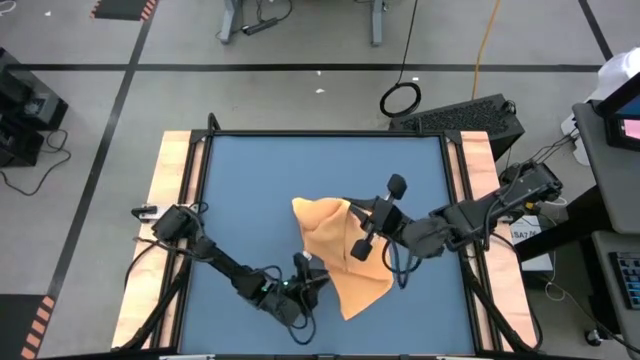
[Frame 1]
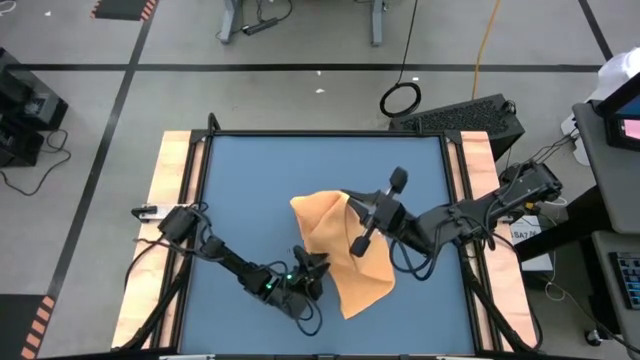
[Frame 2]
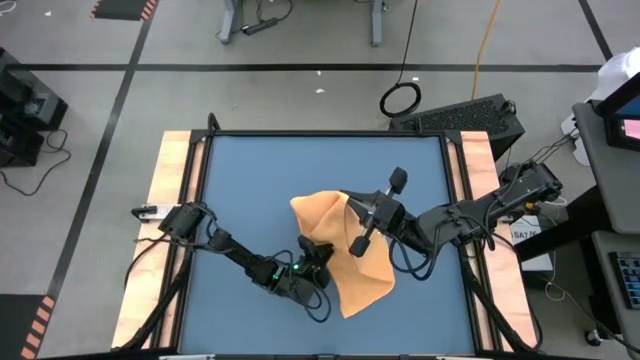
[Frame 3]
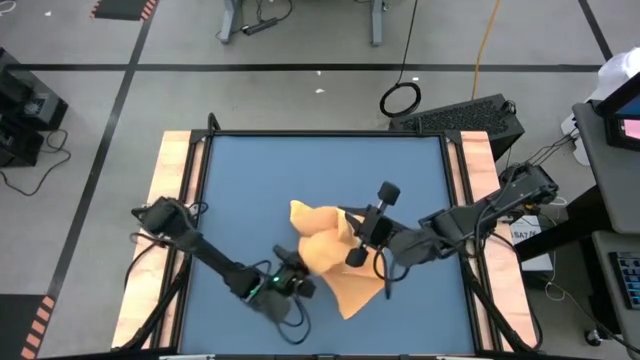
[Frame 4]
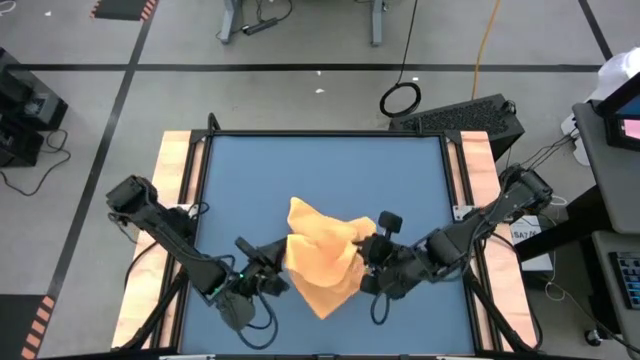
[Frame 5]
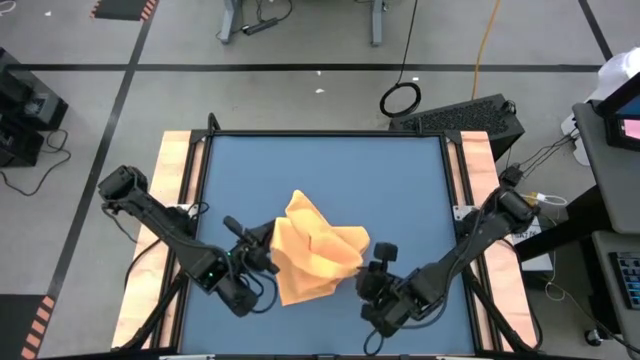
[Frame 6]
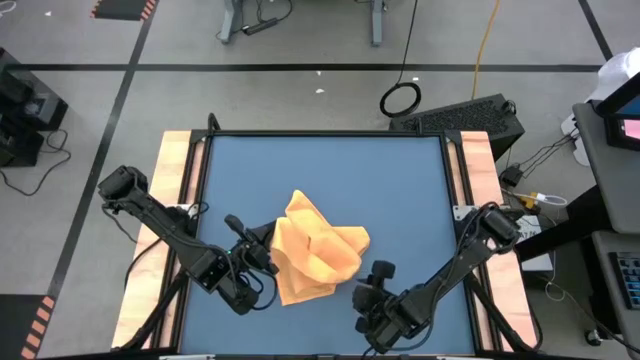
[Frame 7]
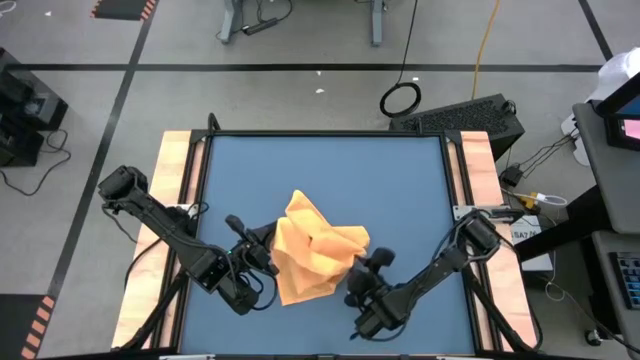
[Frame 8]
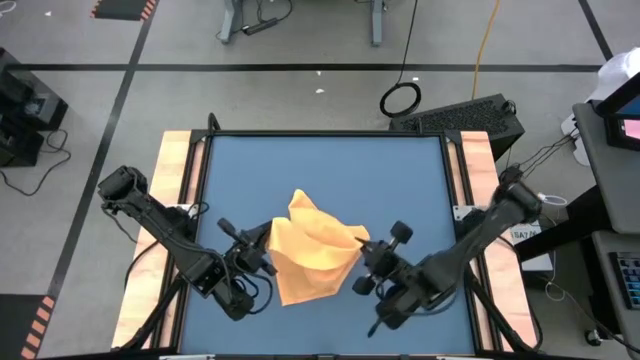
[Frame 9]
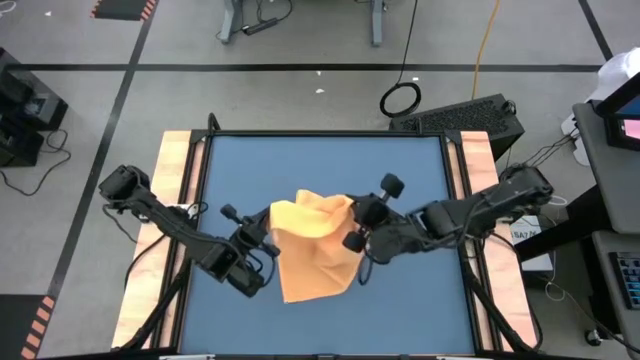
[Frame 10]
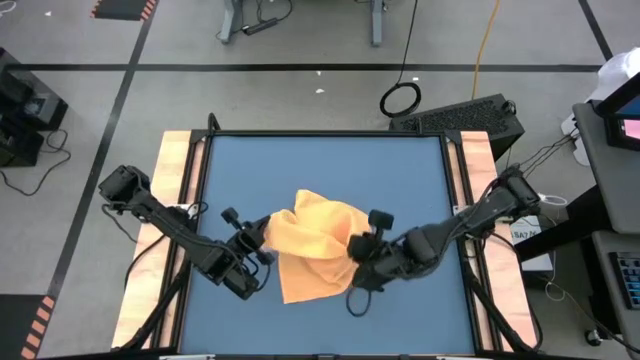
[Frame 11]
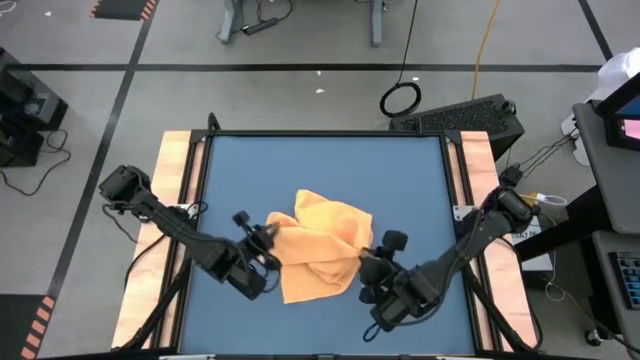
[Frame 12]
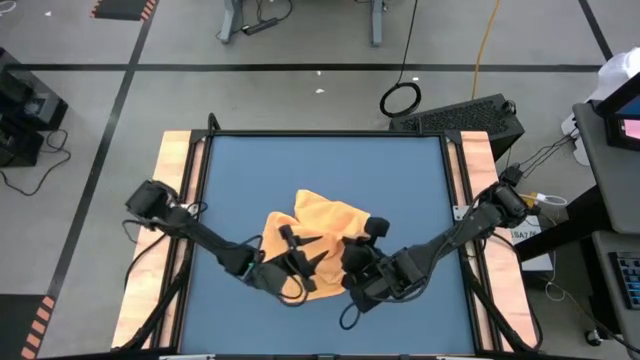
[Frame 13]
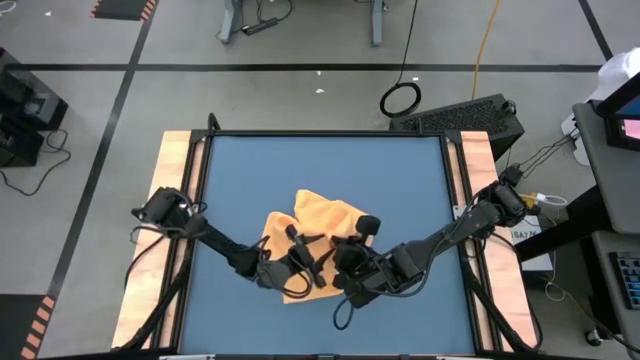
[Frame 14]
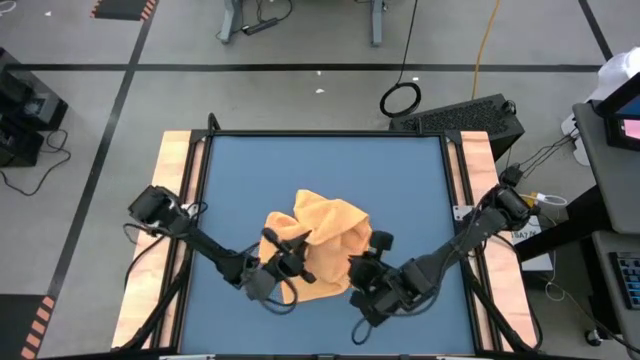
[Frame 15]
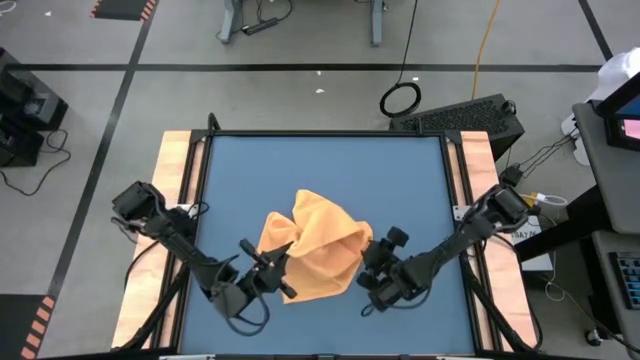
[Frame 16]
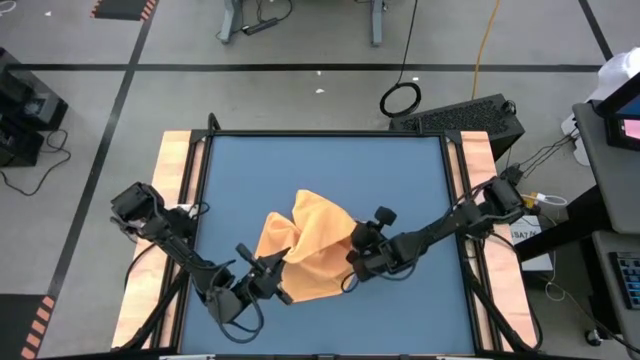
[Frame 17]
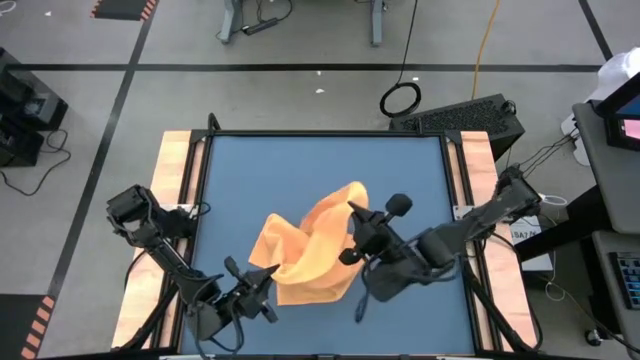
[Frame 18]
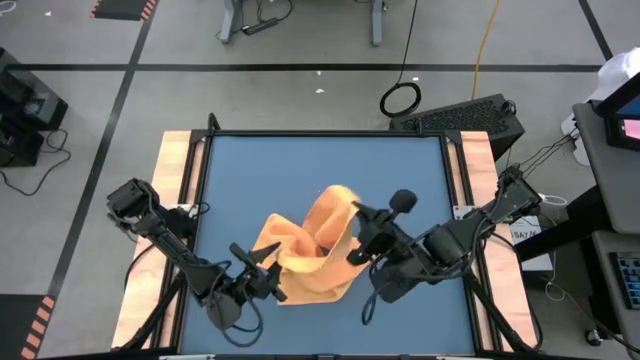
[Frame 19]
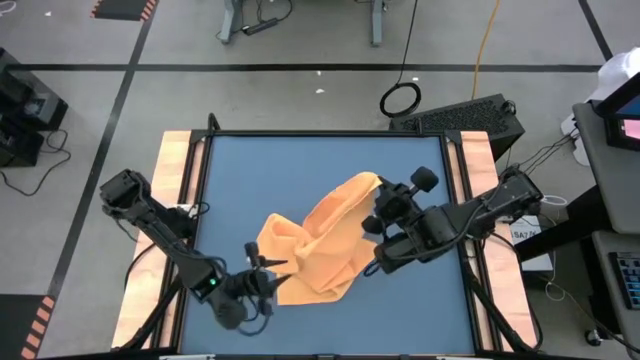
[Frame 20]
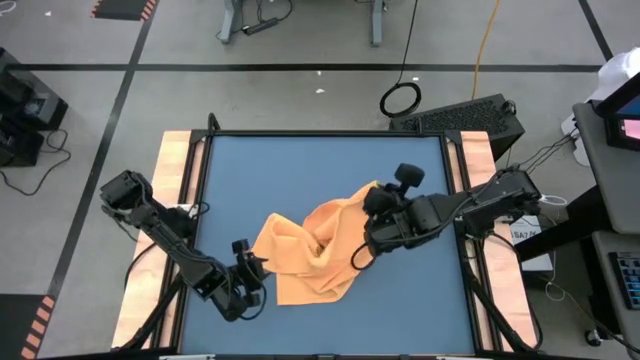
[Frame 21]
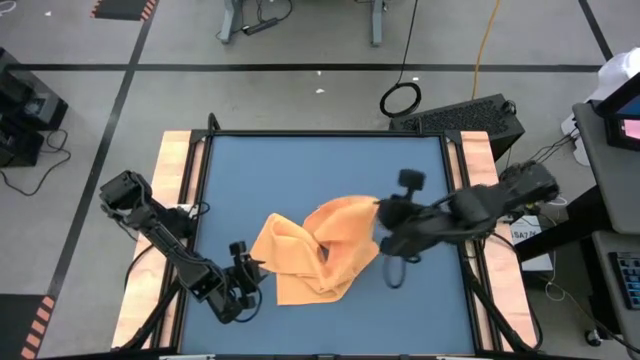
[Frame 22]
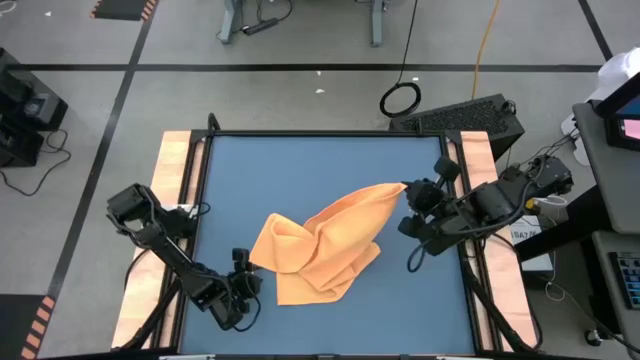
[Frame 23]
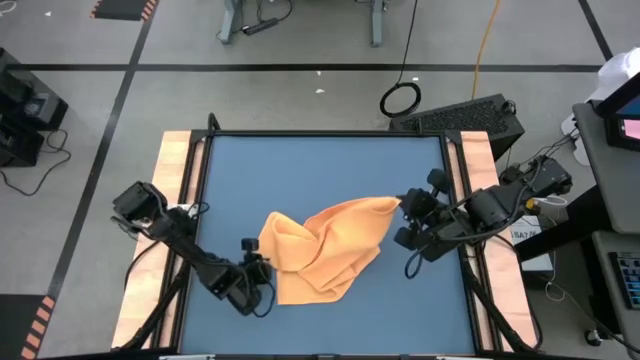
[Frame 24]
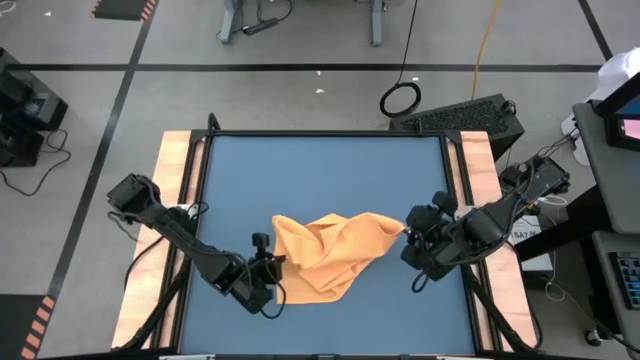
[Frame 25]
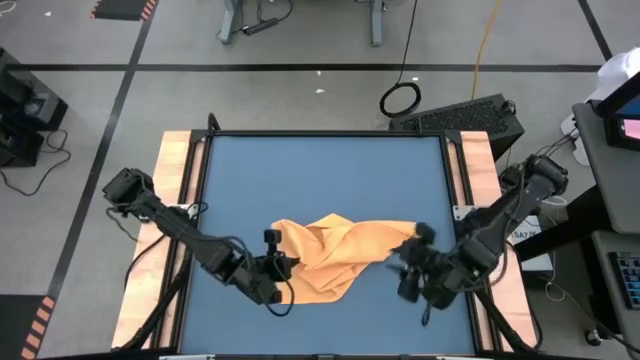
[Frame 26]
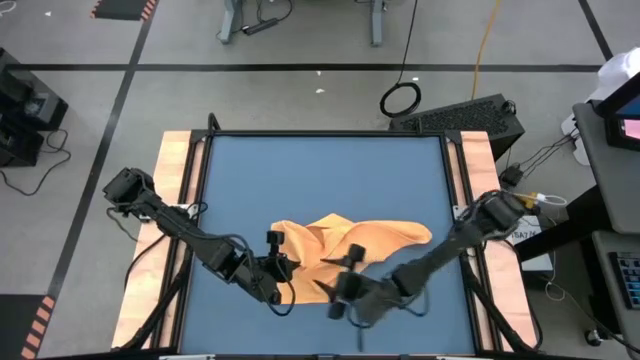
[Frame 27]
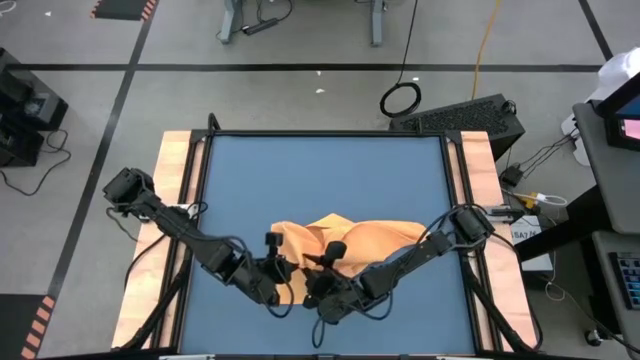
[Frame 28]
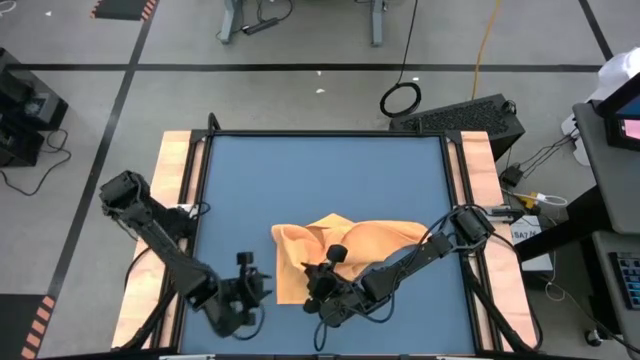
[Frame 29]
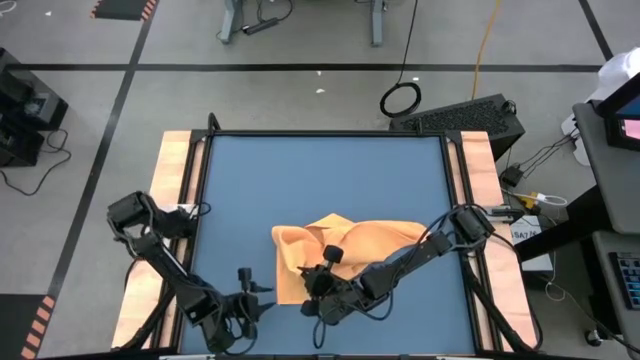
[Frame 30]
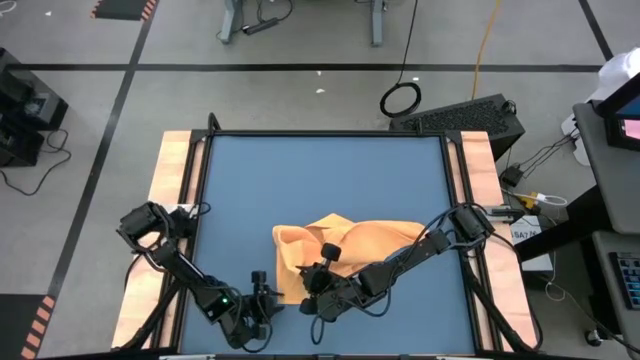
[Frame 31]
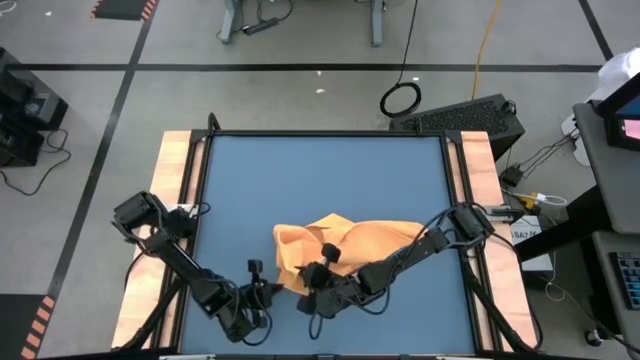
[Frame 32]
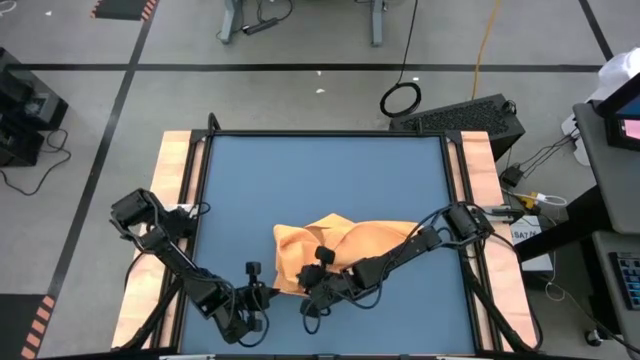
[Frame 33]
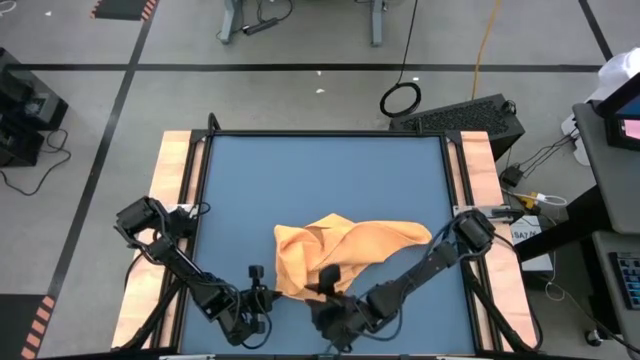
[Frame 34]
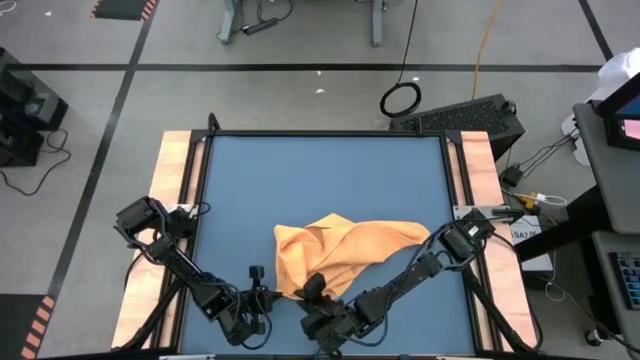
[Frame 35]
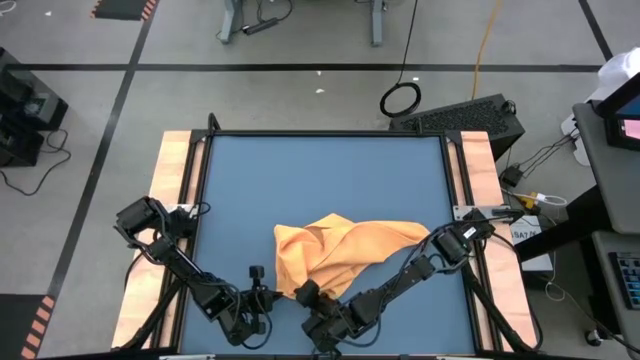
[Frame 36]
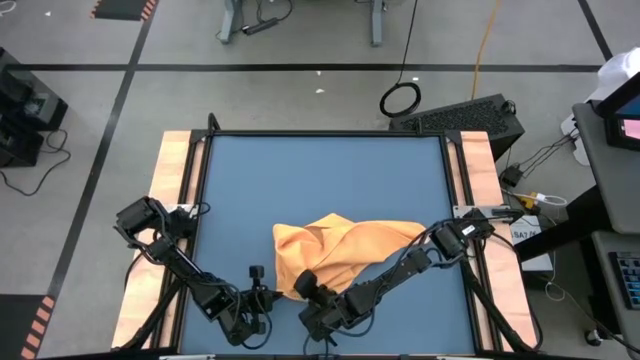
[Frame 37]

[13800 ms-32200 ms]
Task: Roll towel into tight, uniform cylinder
Fold the orange microfiber cloth

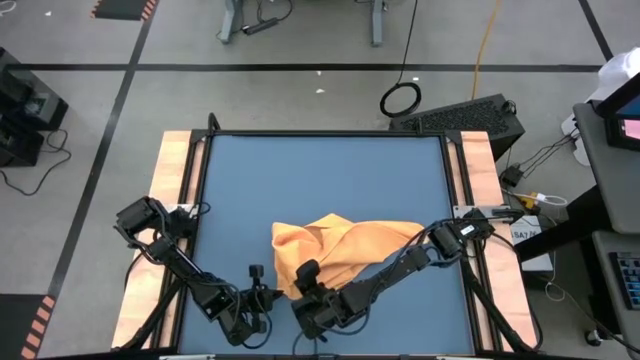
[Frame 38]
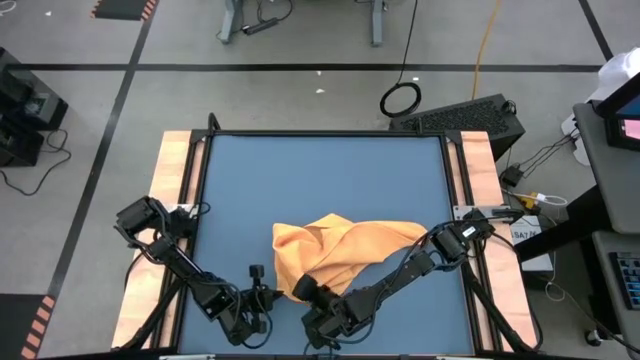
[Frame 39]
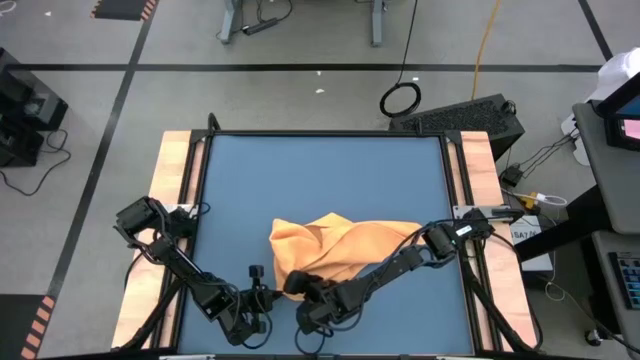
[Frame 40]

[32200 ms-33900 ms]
Fold the orange microfiber cloth

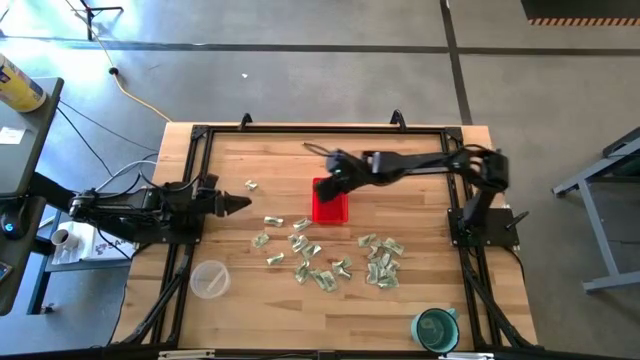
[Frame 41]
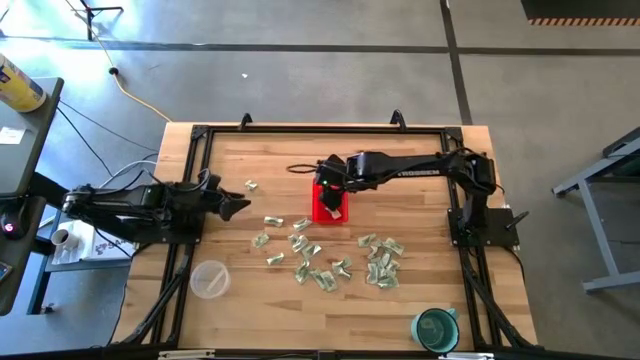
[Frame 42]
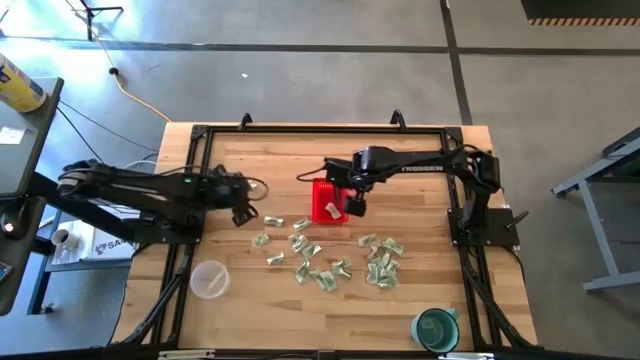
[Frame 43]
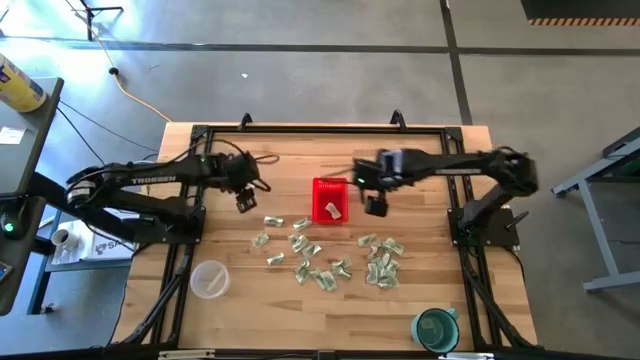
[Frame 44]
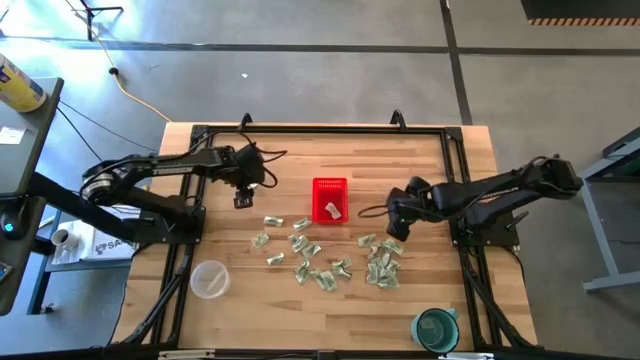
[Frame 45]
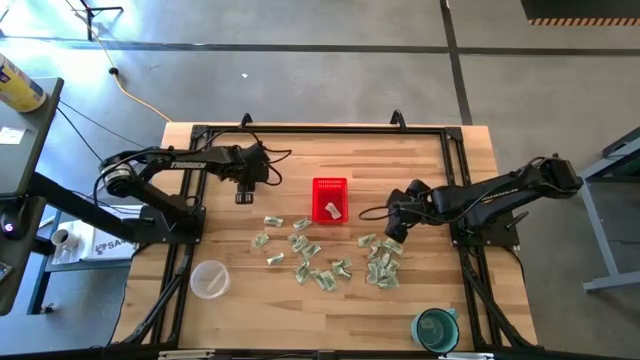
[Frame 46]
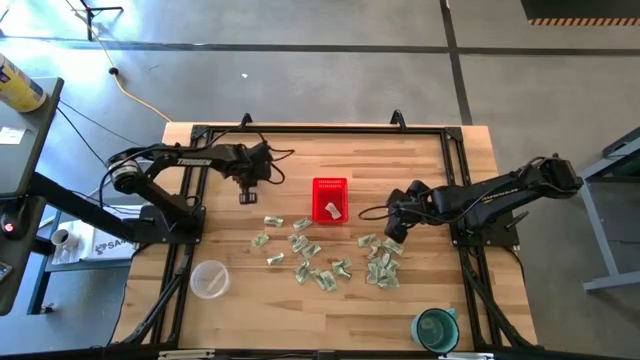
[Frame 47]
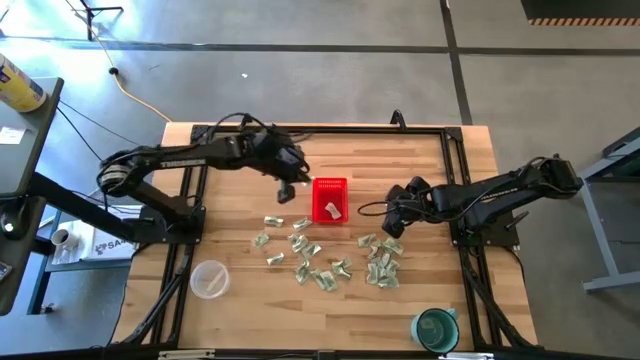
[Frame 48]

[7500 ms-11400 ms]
Task: Pick and place items into bin
Put the light green stevia packet into the red bin
